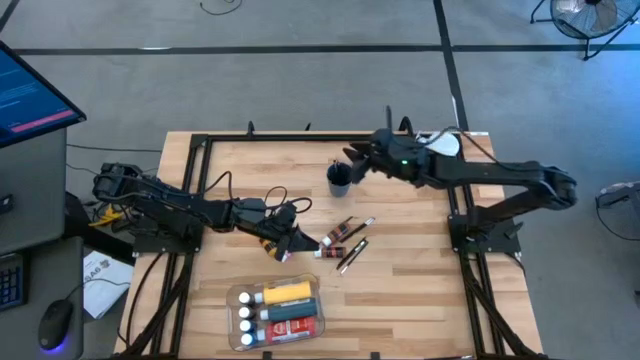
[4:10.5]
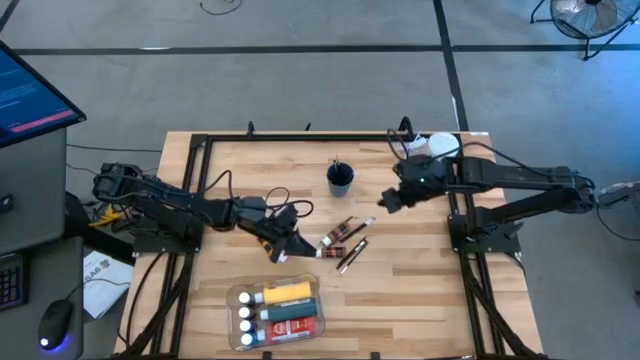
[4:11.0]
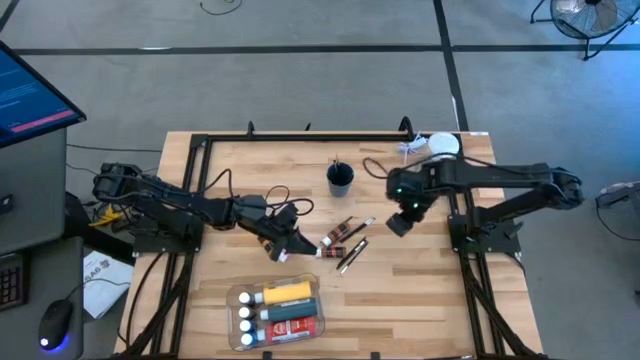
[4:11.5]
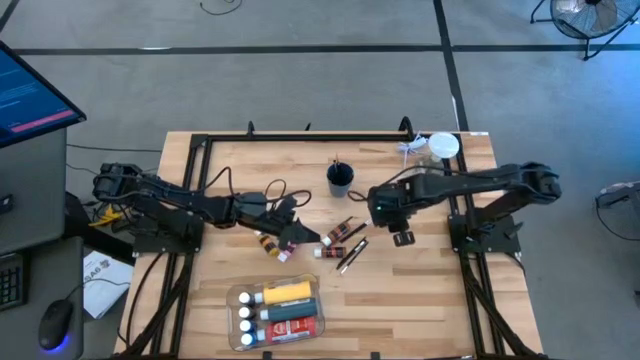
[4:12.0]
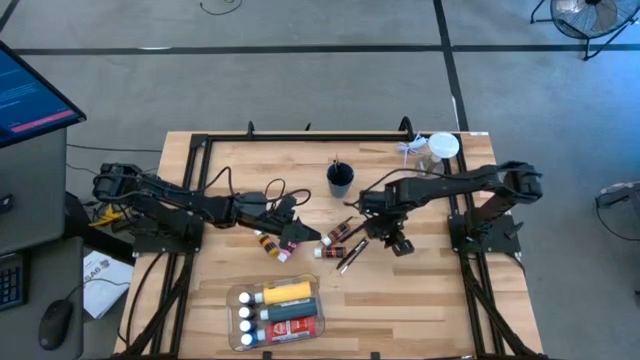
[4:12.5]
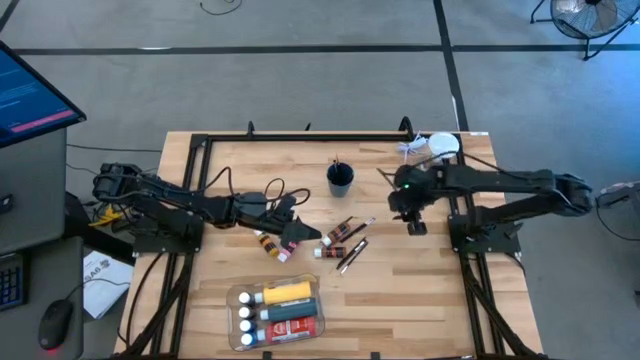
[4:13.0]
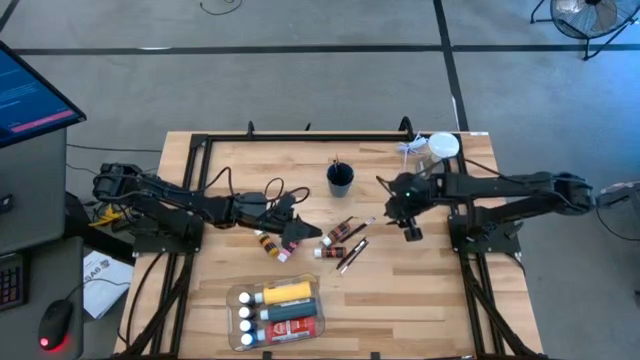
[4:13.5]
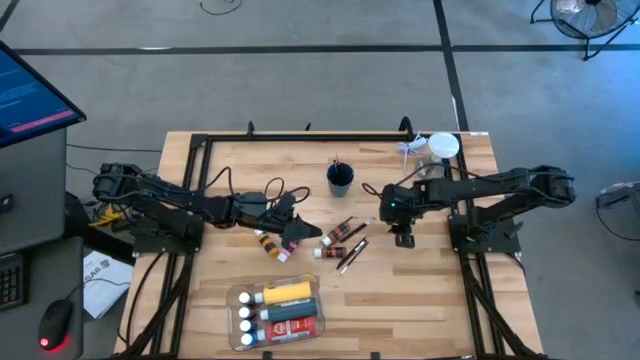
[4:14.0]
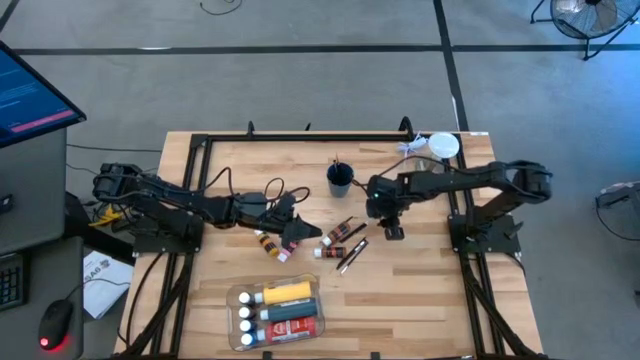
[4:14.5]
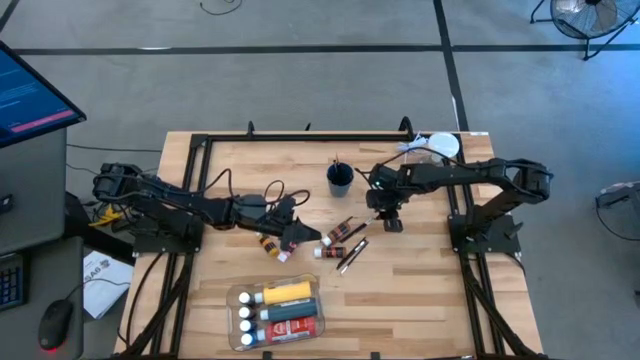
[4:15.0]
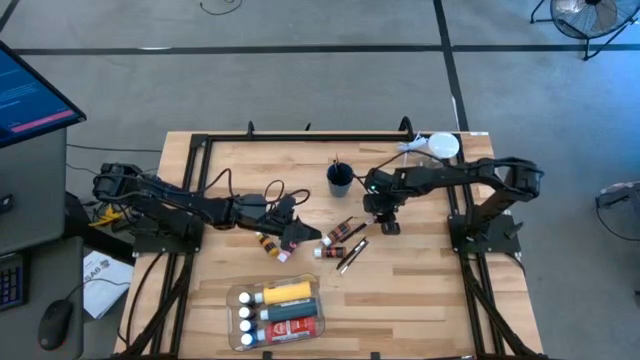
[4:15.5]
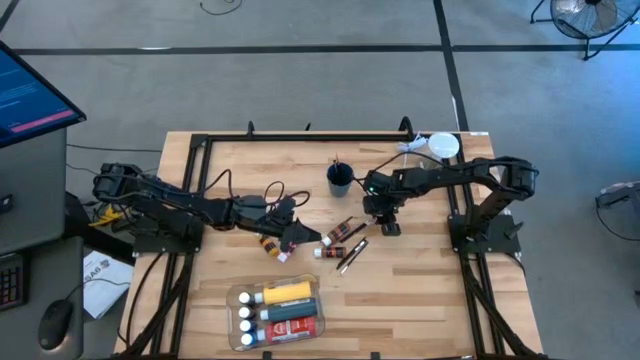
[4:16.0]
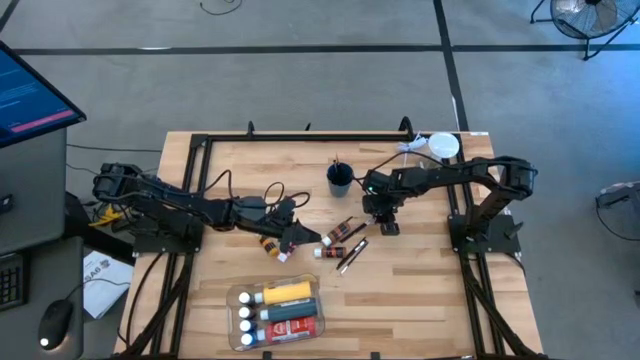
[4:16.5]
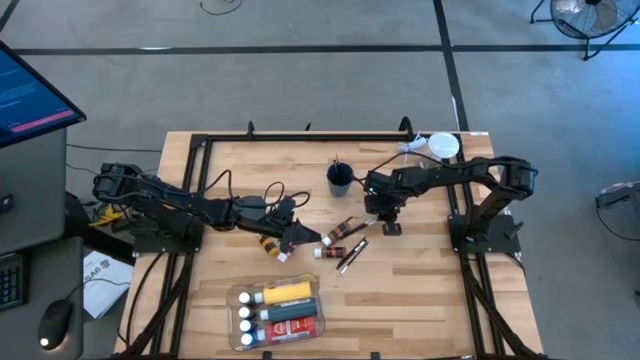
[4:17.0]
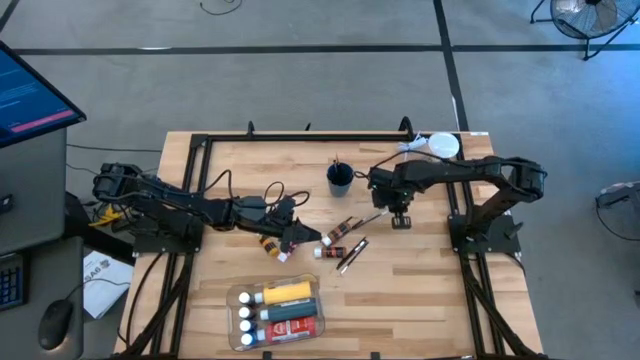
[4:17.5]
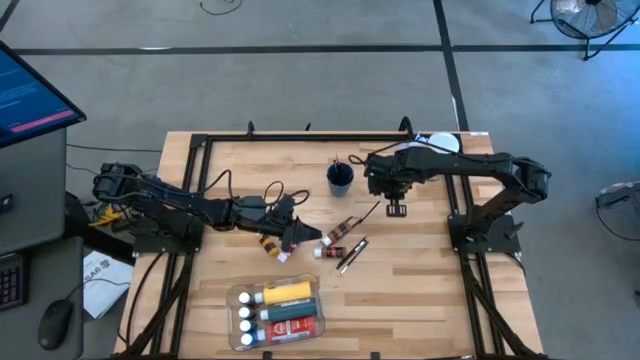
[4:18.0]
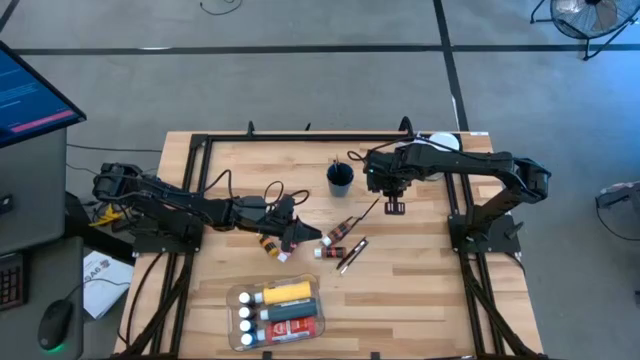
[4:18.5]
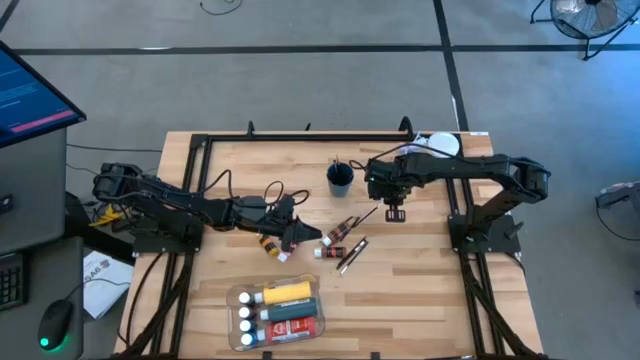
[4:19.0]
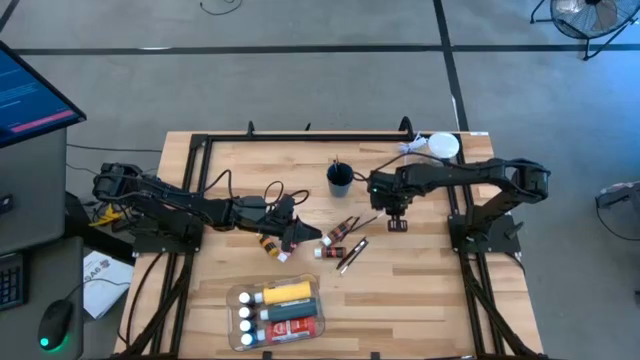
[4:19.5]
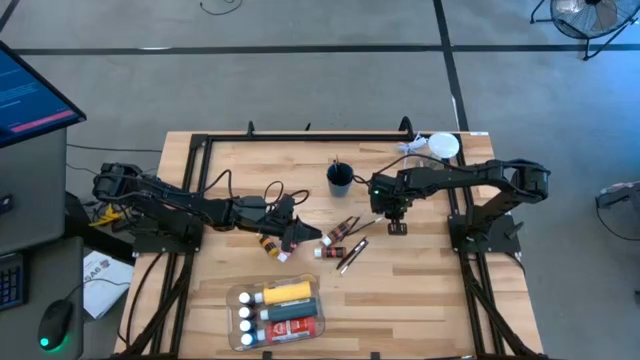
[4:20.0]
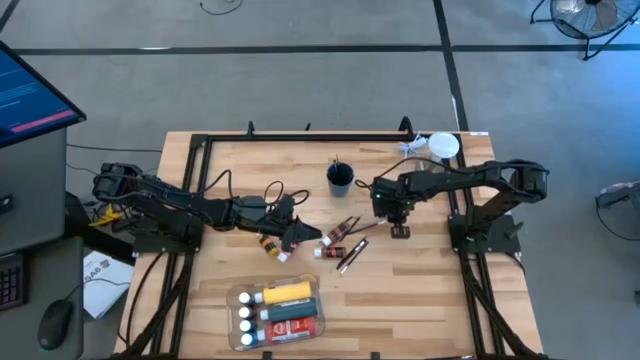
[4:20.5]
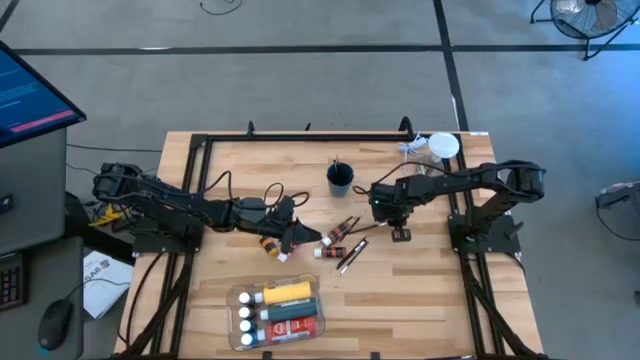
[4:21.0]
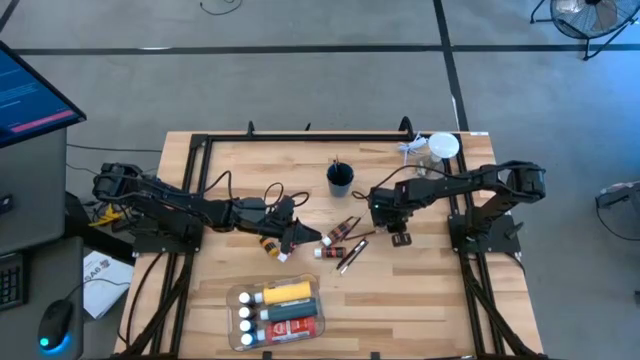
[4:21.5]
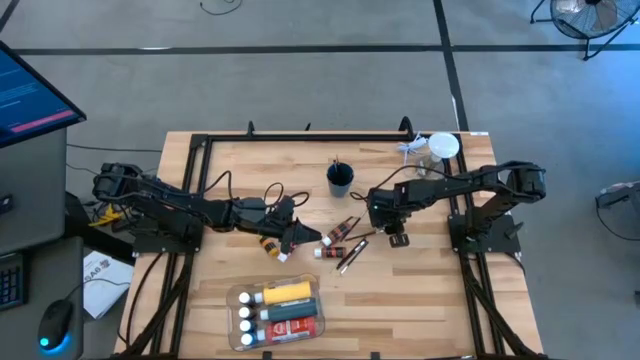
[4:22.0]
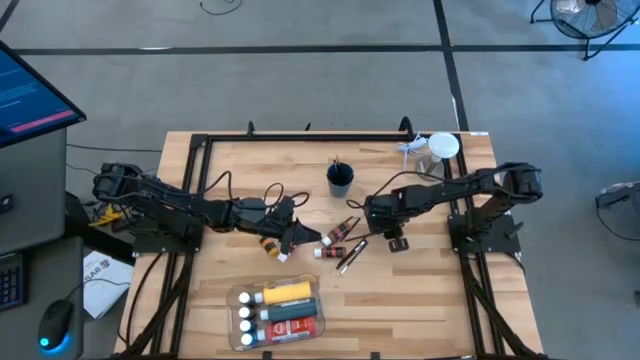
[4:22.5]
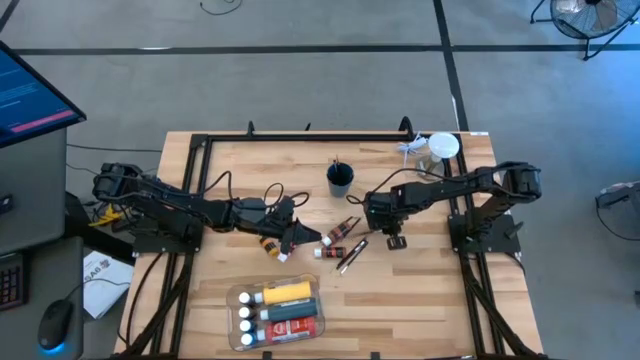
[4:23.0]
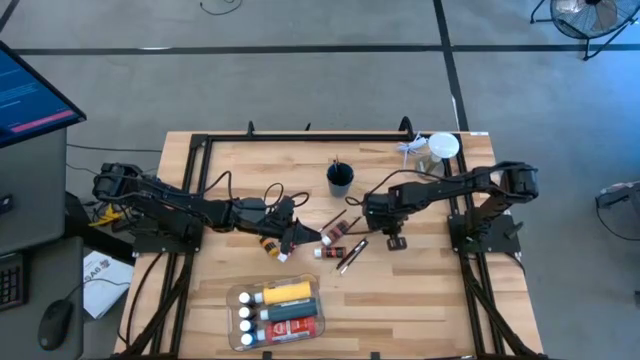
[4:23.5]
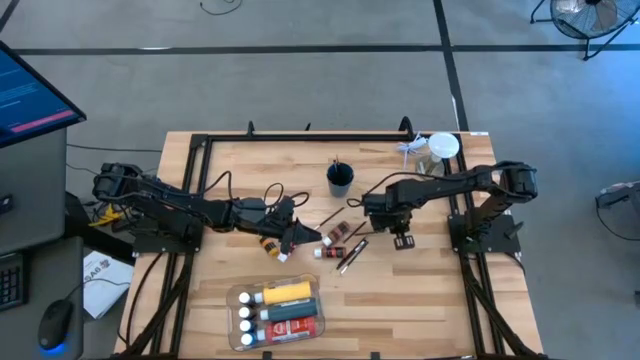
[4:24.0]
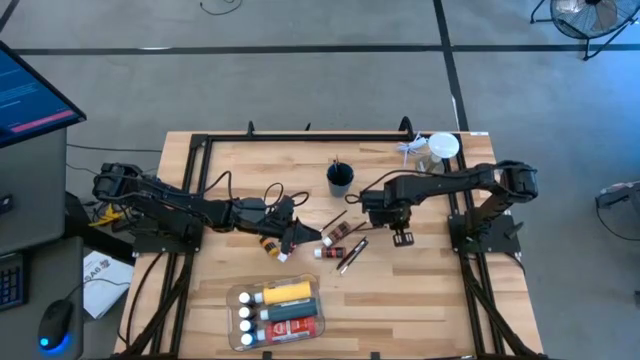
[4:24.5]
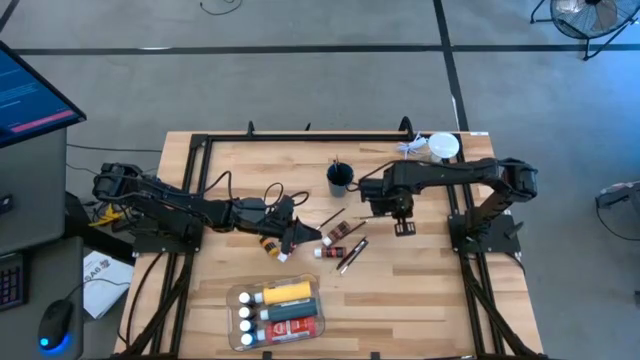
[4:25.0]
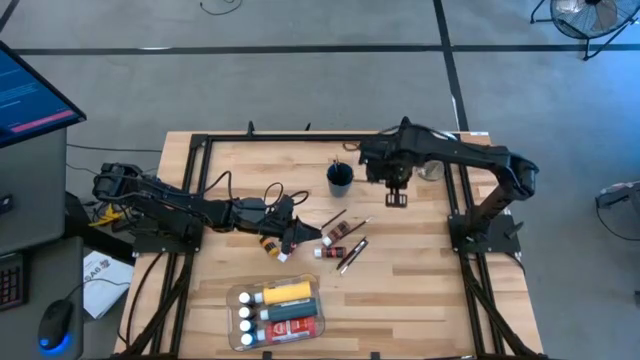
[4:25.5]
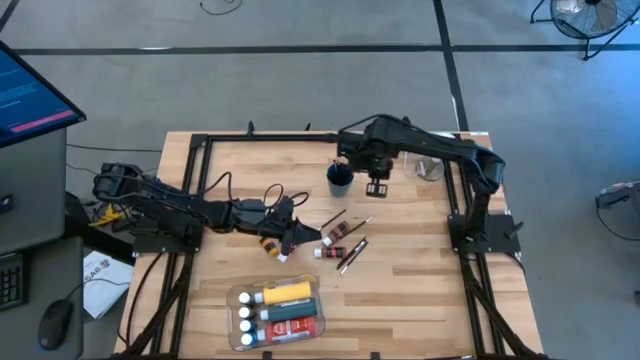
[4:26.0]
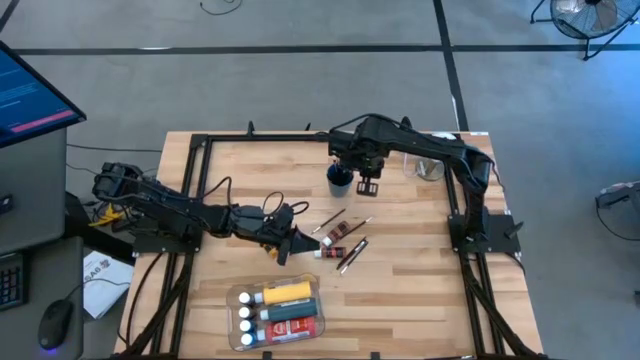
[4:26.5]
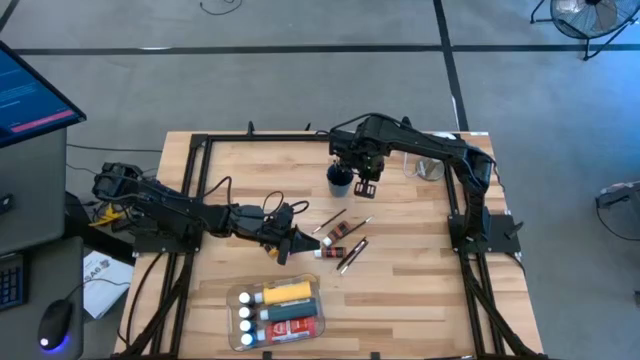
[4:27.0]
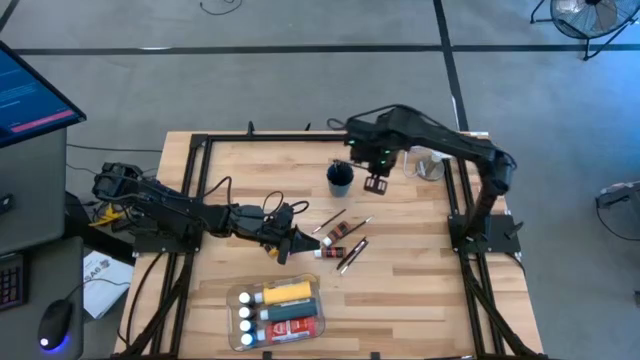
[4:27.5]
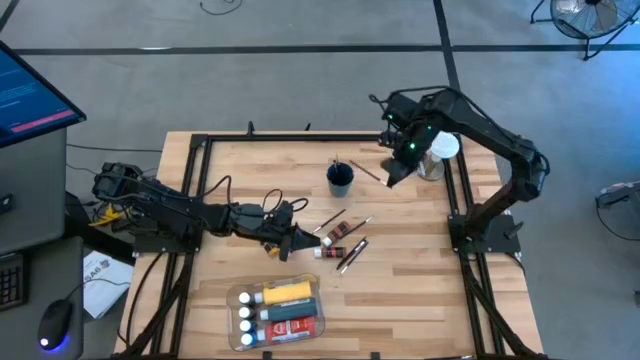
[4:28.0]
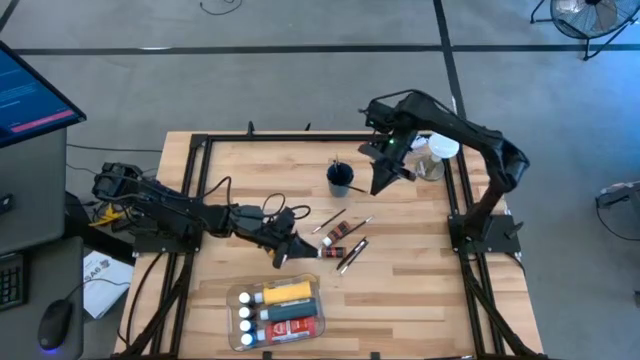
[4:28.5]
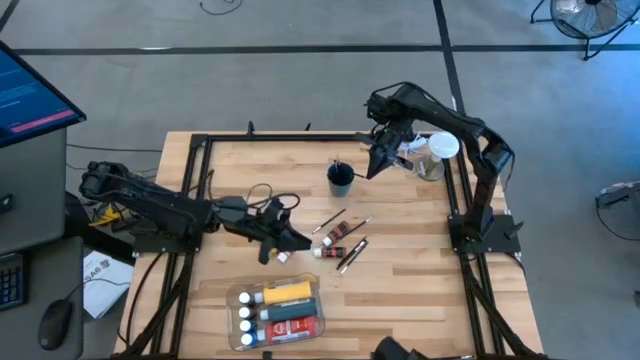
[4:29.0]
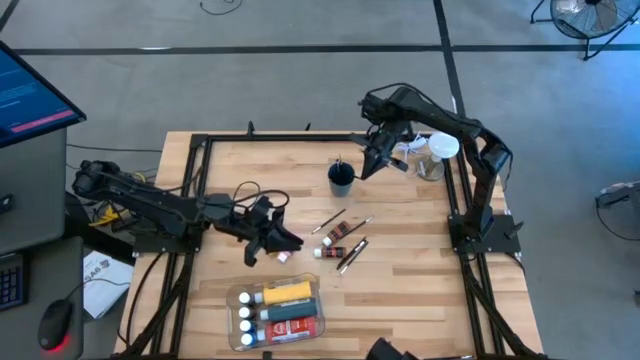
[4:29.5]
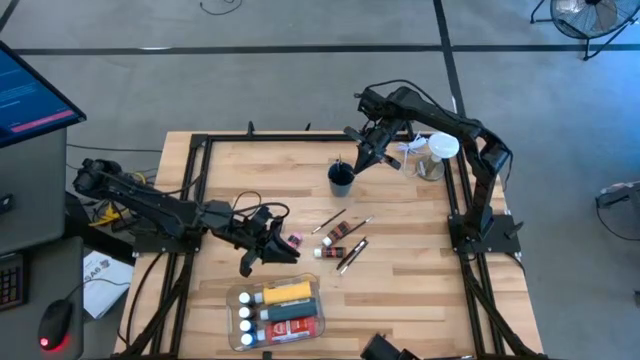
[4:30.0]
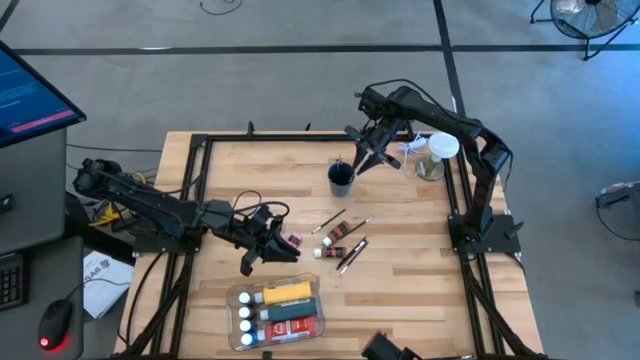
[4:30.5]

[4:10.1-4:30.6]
Task: Pick & Place Paint Supplies
Put the paint brush into the blue cup

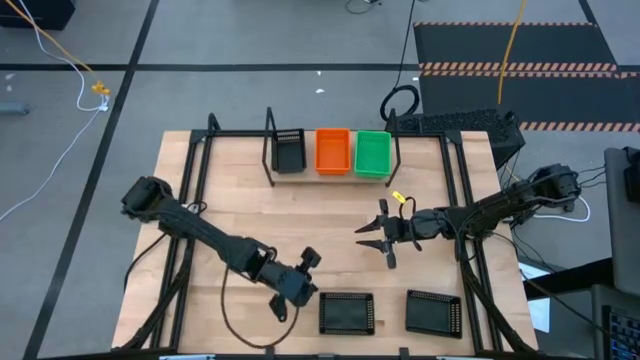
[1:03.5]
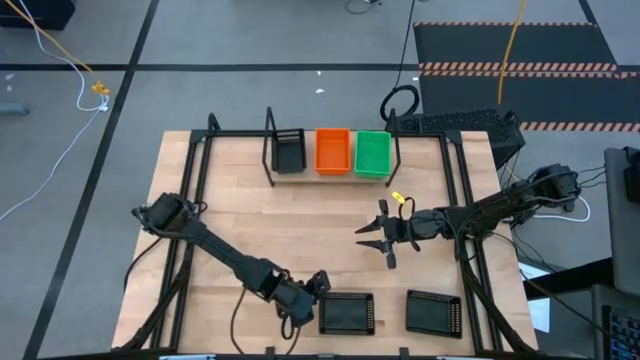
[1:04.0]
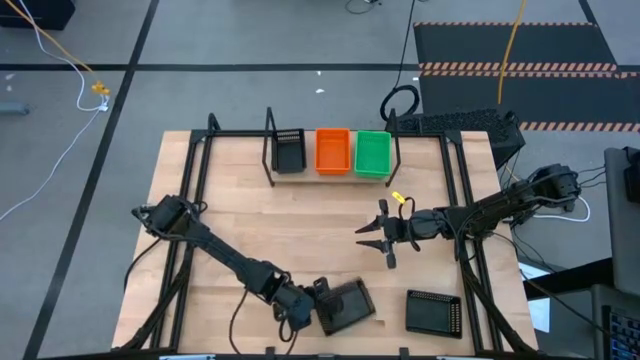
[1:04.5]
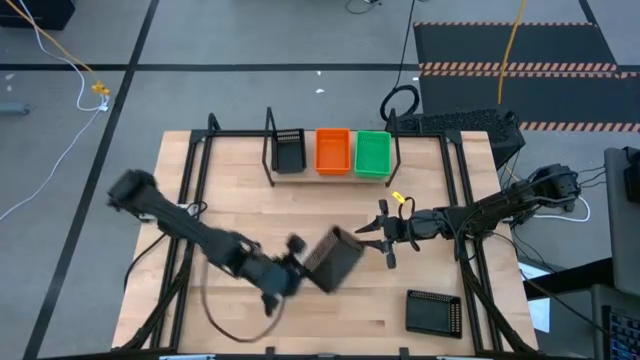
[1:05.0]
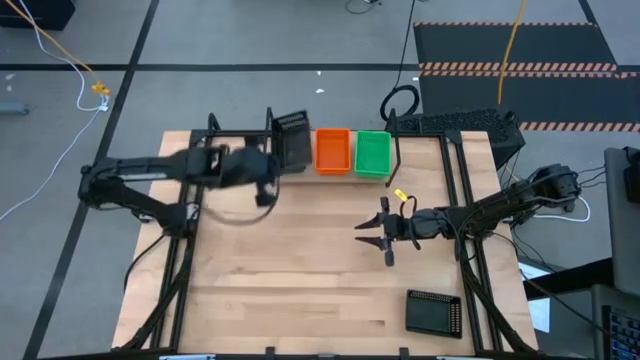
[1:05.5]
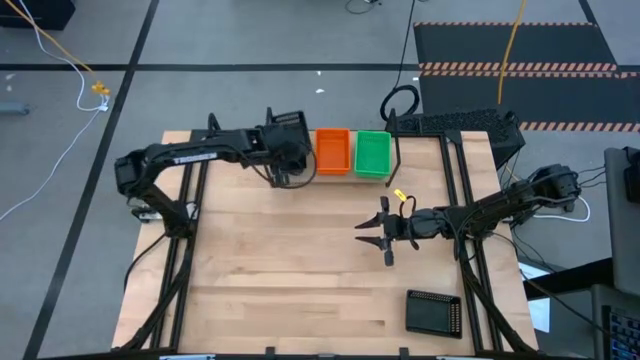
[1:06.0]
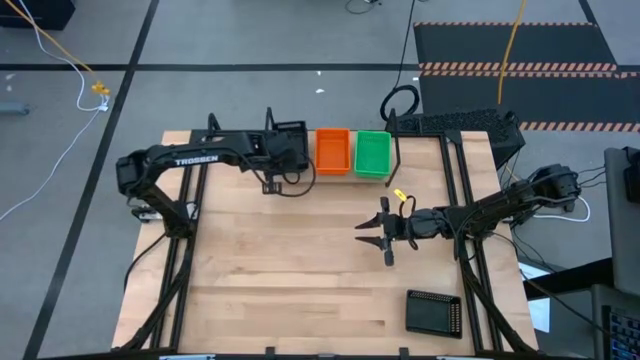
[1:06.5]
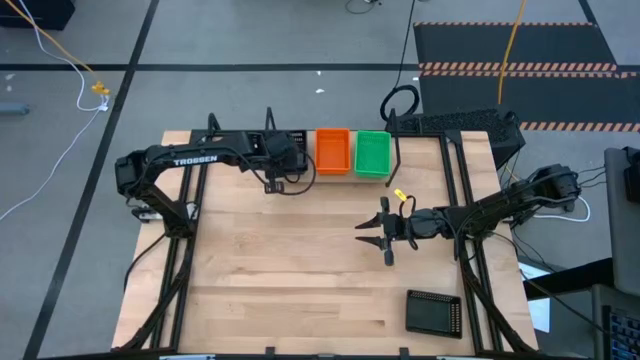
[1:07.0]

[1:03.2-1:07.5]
Task: Stack baskets on shelf by color
Stack the left black bin on top of the black bin on the shelf
